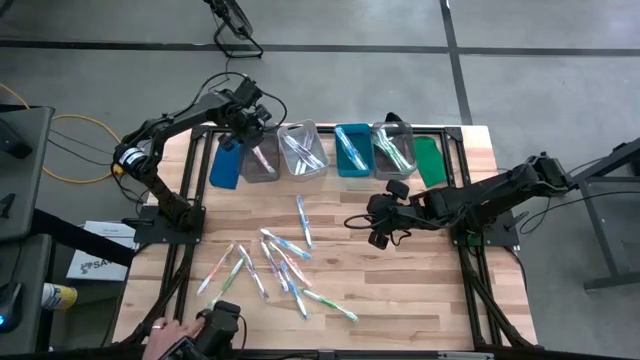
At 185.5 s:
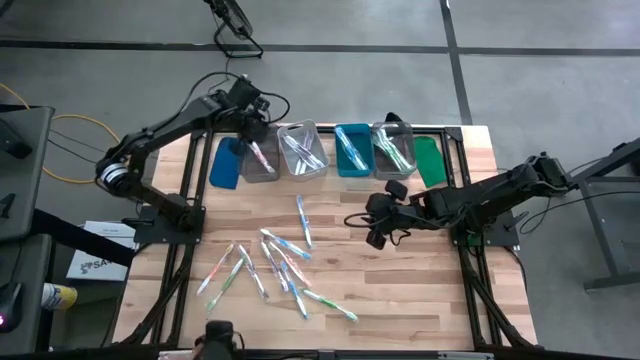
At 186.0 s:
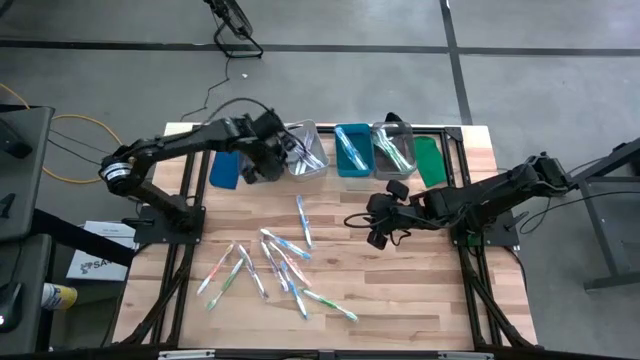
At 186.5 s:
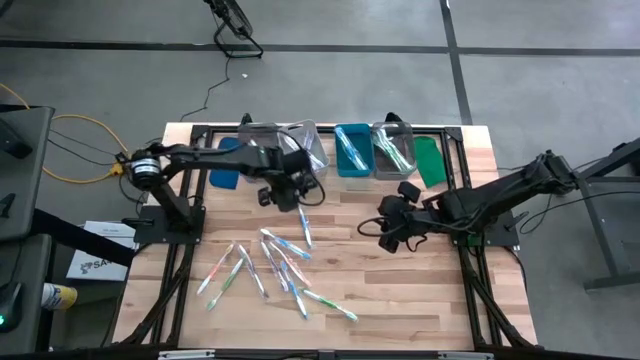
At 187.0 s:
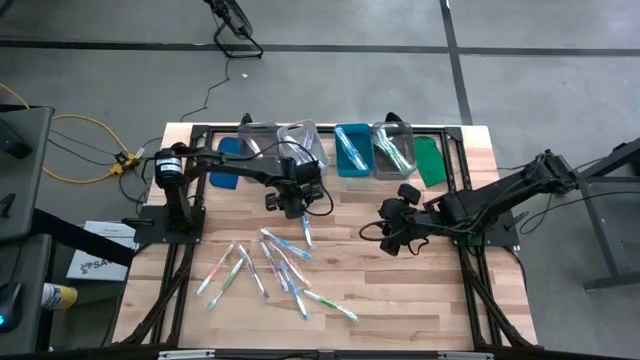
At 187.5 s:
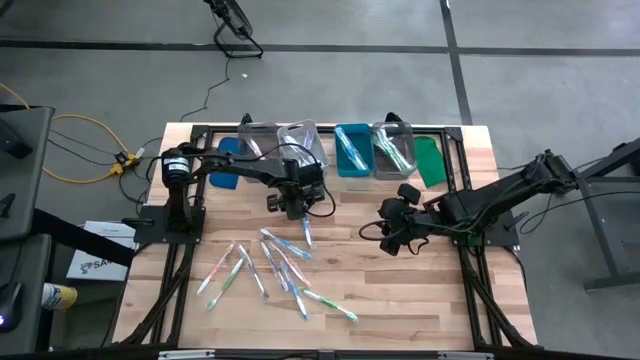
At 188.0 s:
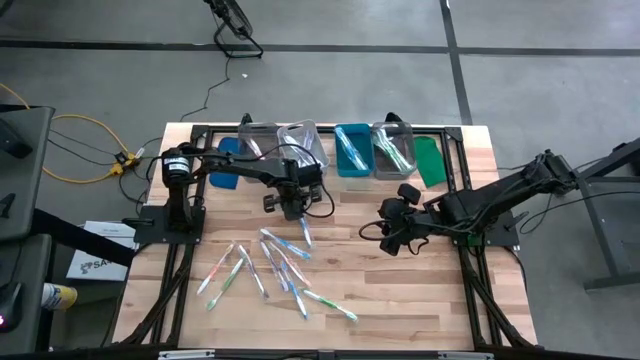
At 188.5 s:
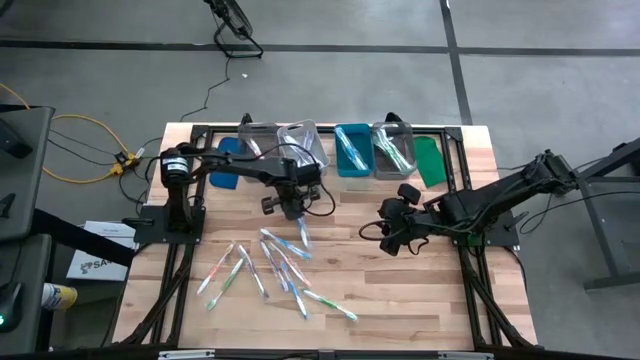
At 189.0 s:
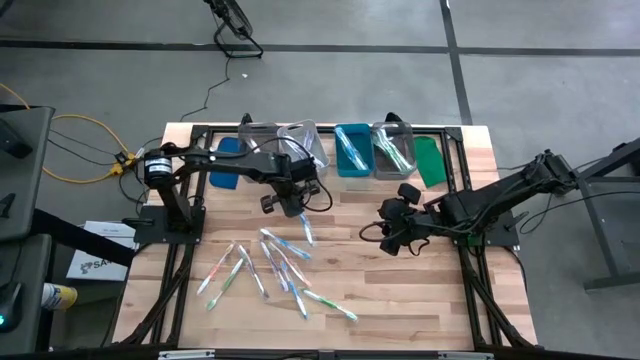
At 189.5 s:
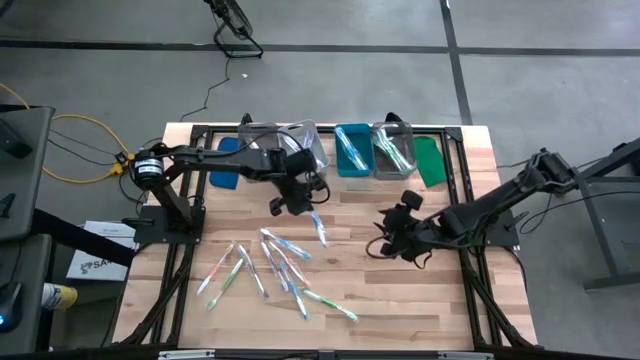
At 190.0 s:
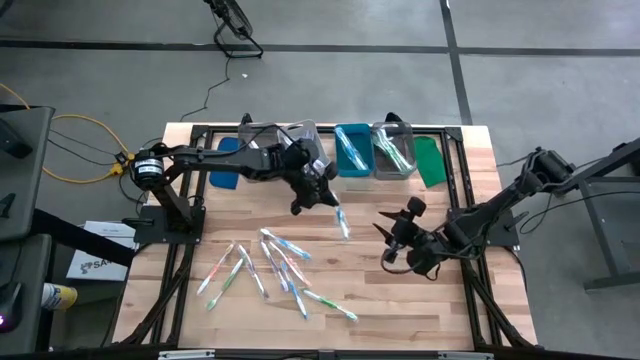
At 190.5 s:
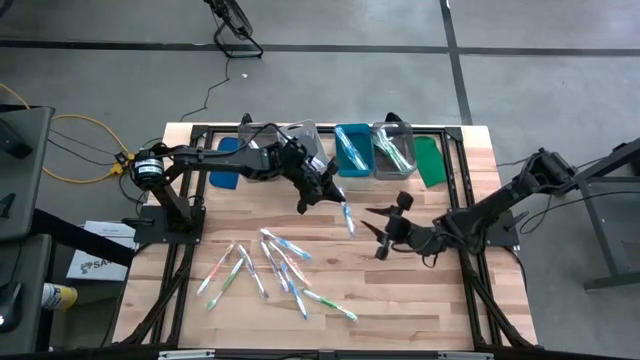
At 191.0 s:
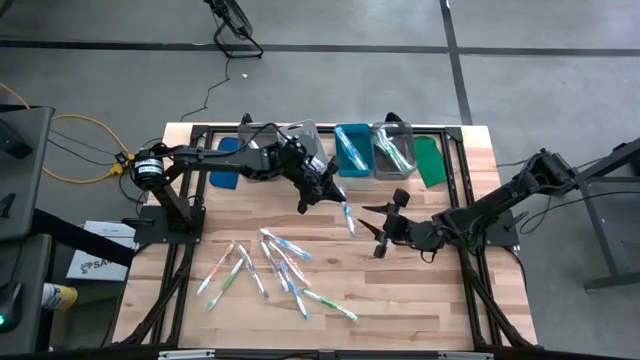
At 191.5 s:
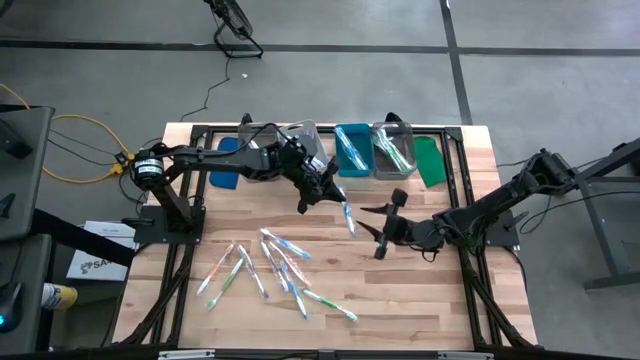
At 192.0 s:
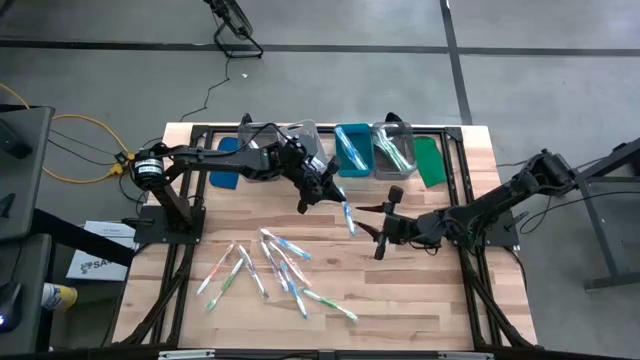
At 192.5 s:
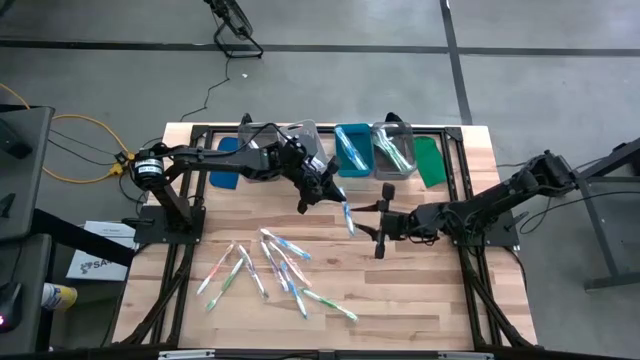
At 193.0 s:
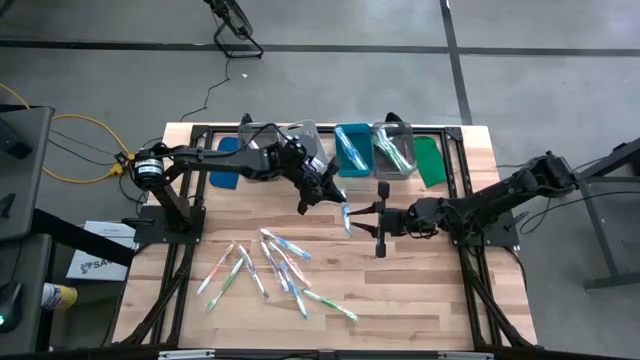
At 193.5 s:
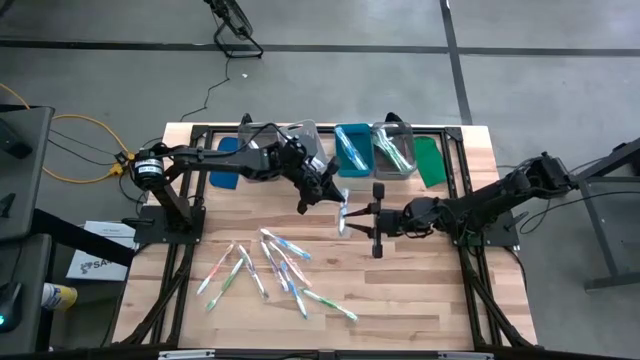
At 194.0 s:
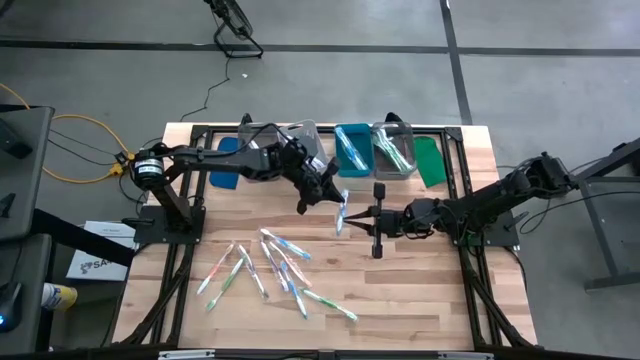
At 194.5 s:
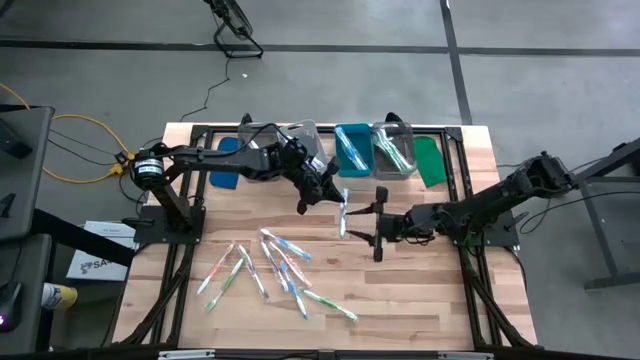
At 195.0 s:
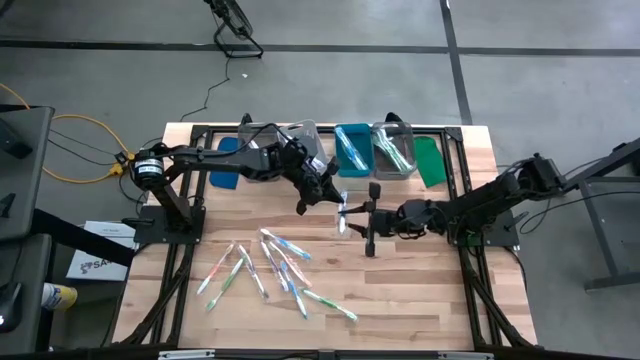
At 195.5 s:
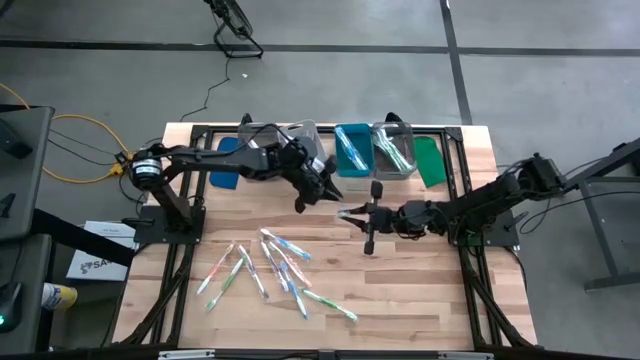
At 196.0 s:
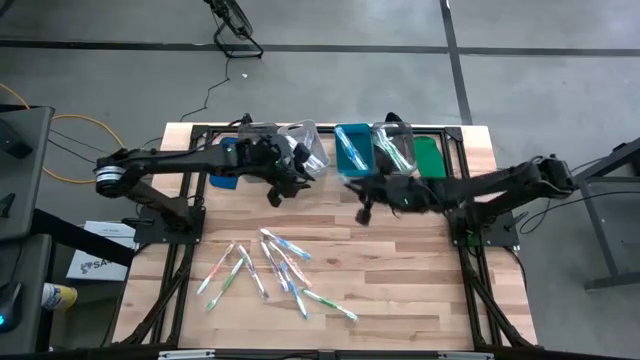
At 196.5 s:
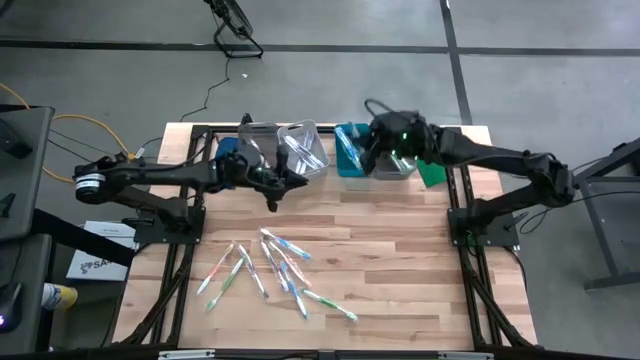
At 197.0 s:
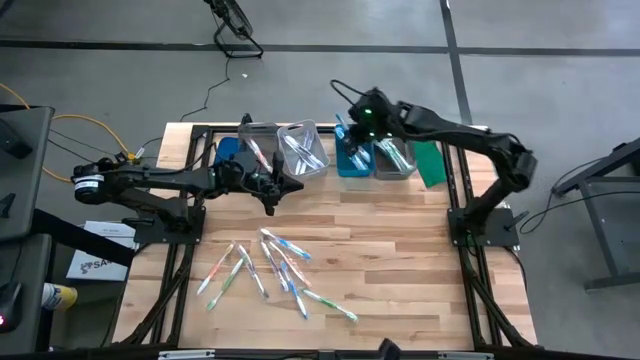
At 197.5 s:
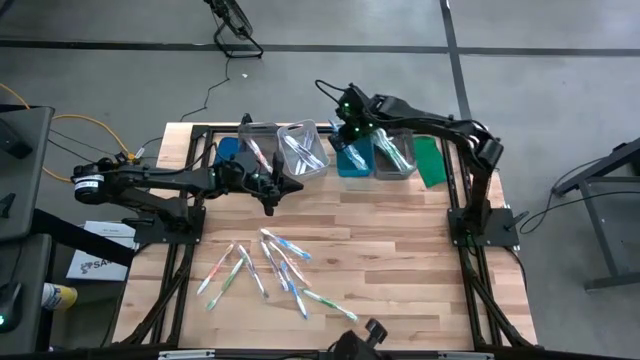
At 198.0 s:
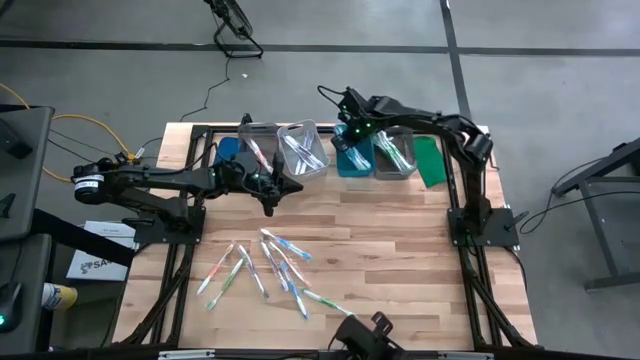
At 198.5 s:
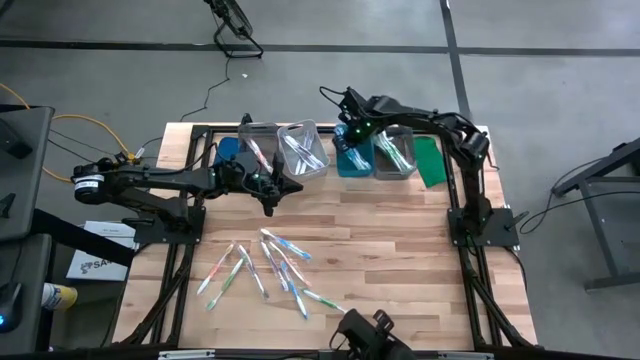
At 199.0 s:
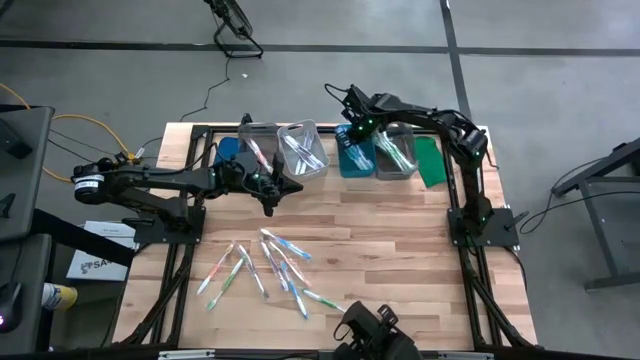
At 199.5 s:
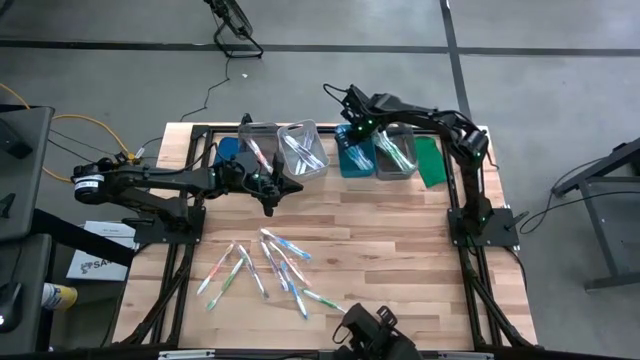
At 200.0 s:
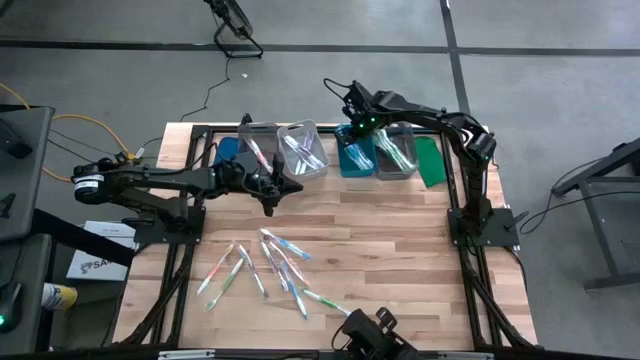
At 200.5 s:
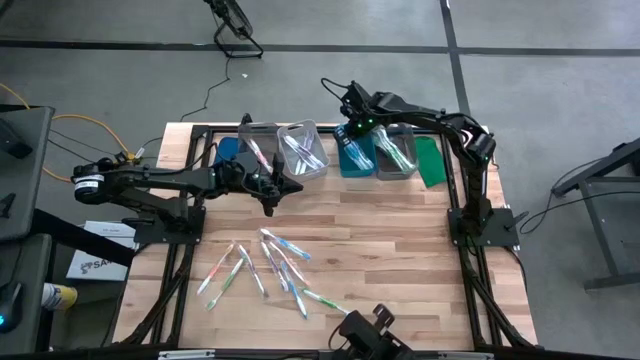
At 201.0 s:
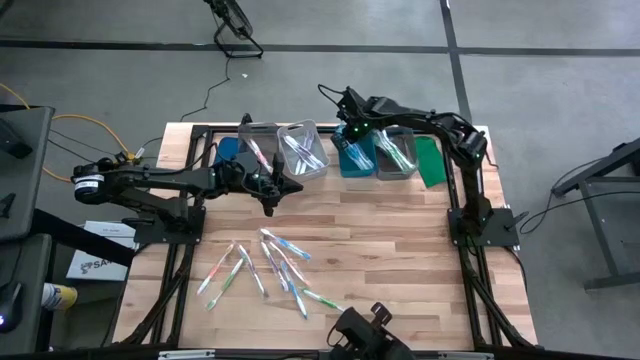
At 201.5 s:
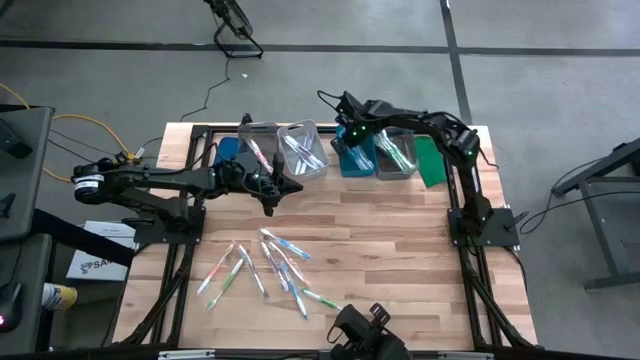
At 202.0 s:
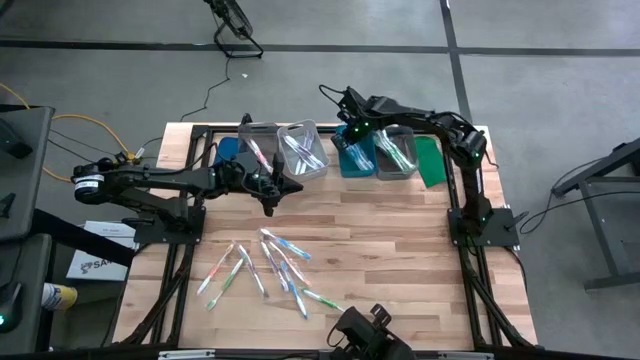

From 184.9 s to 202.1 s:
Task: Pick & Place Toothbrushes
Put the blue toothbrush into the blue bin

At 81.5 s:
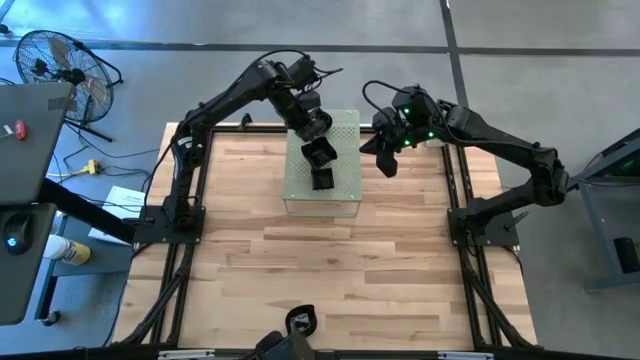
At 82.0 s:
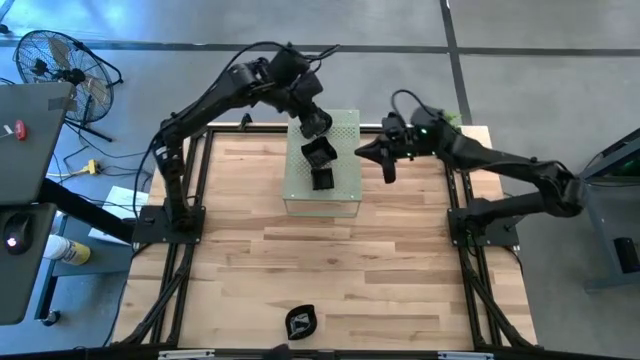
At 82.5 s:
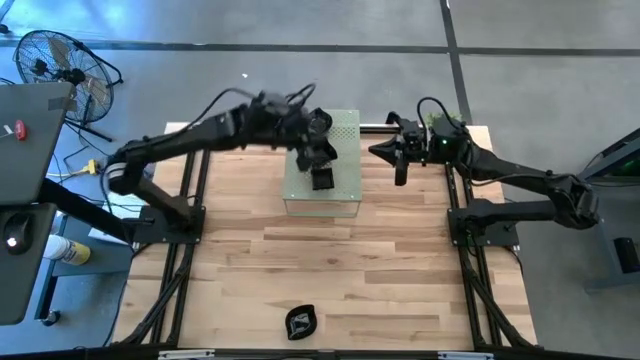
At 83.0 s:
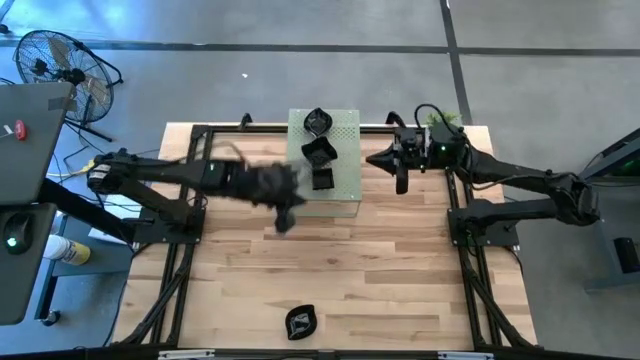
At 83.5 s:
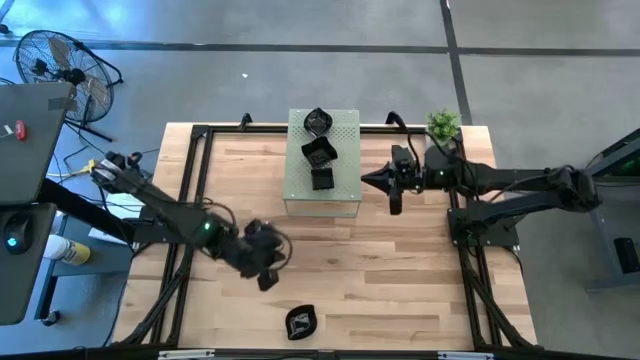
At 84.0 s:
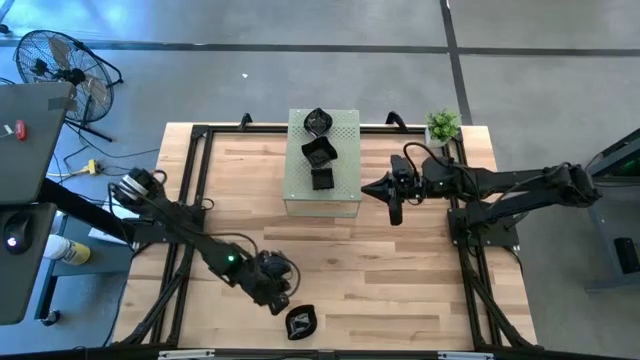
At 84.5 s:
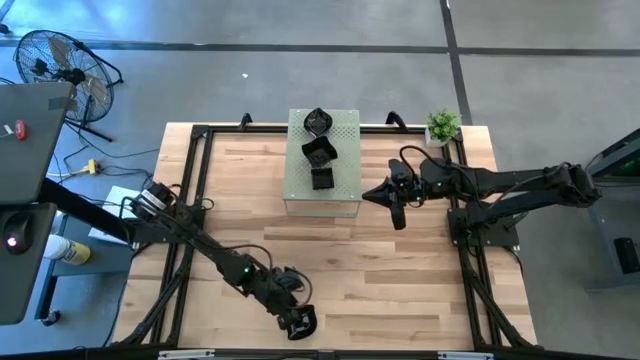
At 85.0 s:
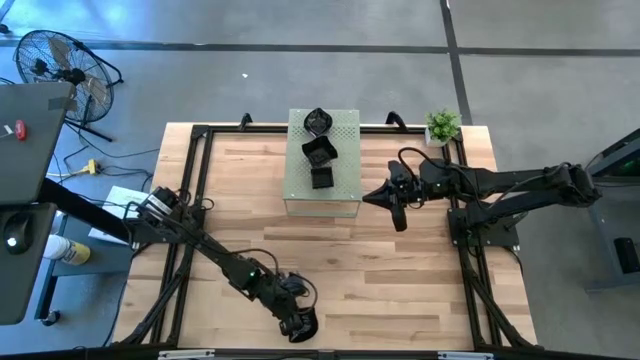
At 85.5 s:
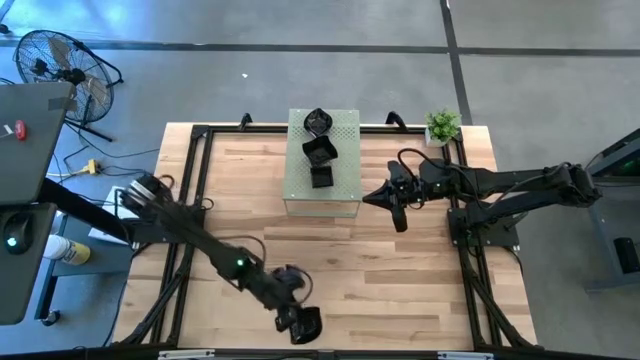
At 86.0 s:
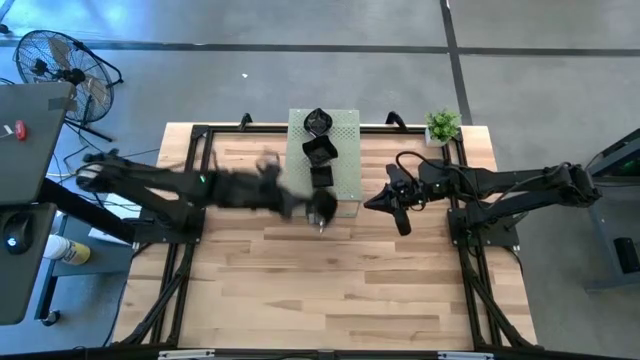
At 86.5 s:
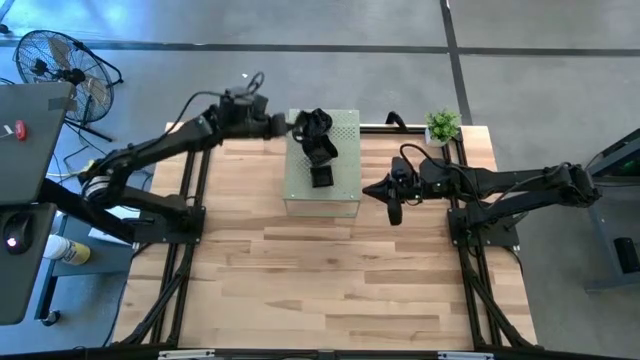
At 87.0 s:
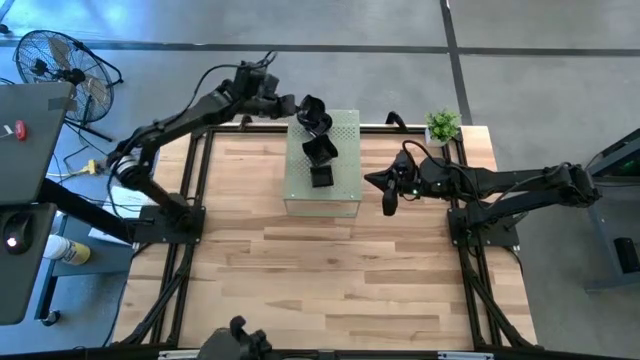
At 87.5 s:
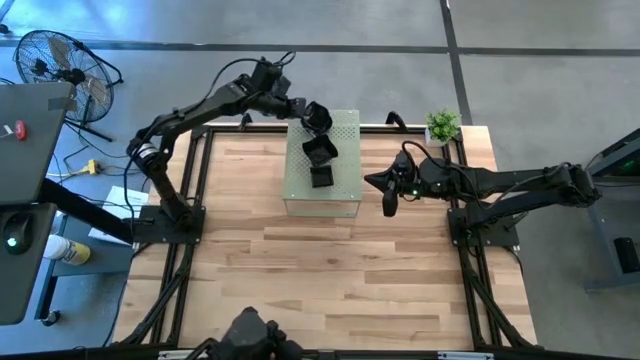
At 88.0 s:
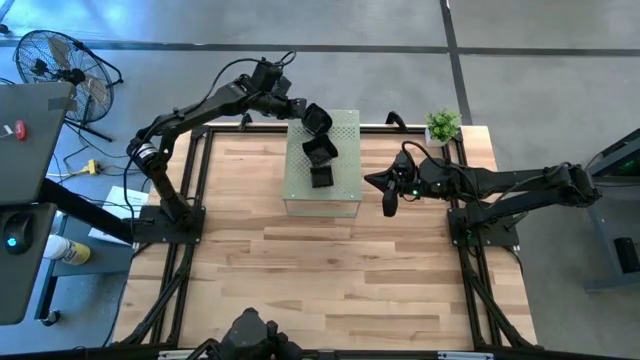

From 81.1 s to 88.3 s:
Task: Pick & Place Mini shaped plates
Stack the black leaf-shaped plate on top of the black leaf-shaped plate on the shelf
